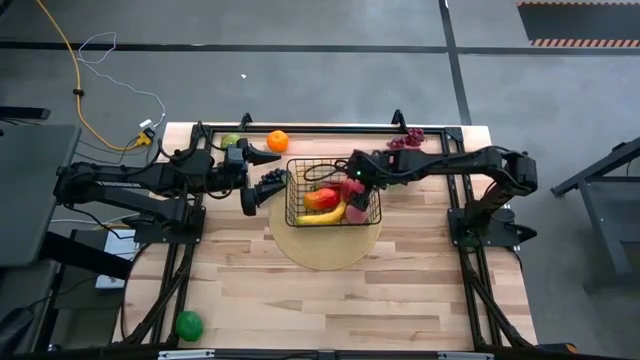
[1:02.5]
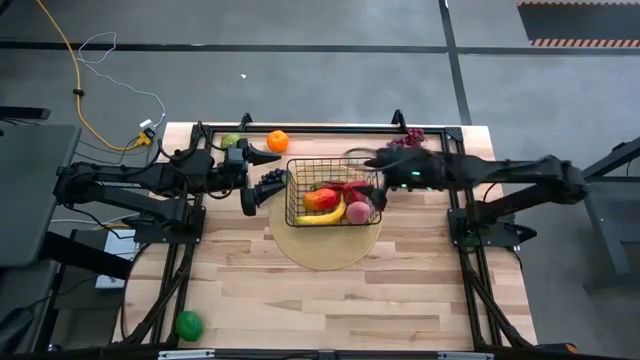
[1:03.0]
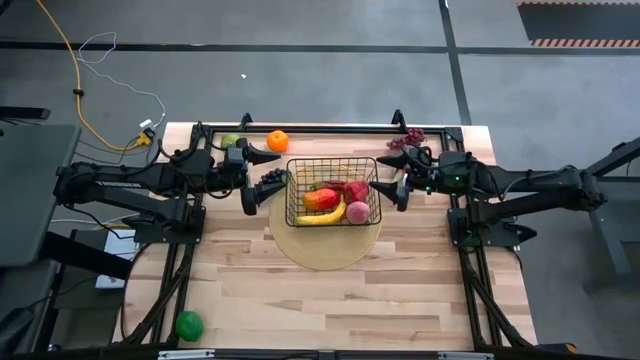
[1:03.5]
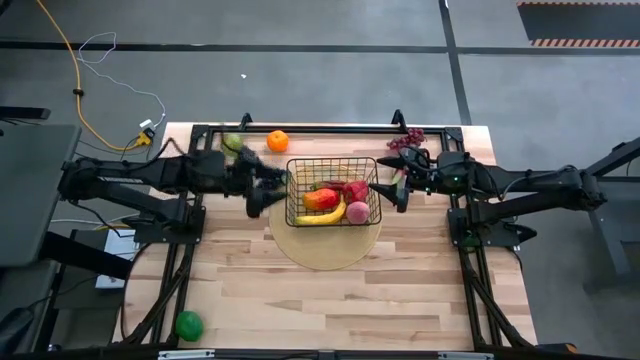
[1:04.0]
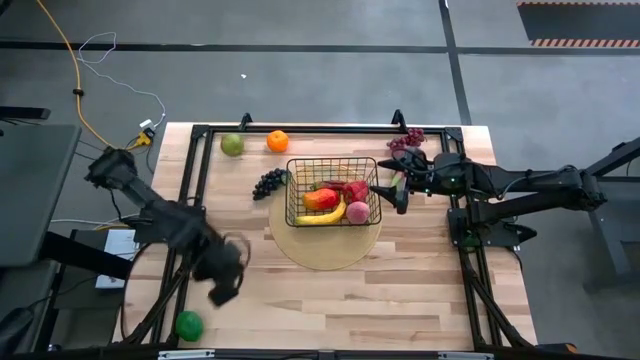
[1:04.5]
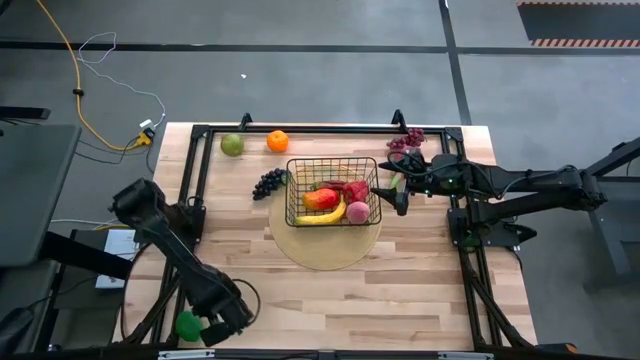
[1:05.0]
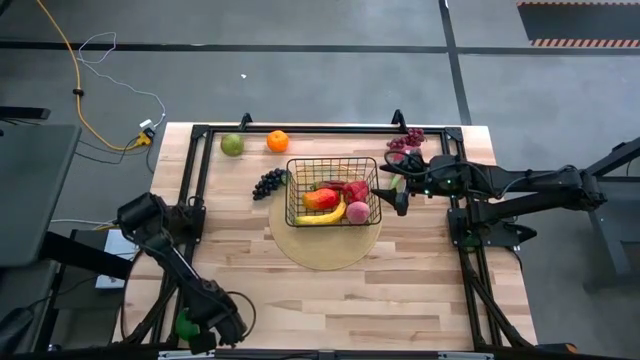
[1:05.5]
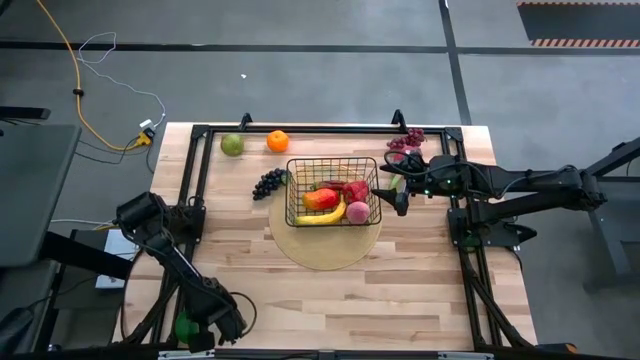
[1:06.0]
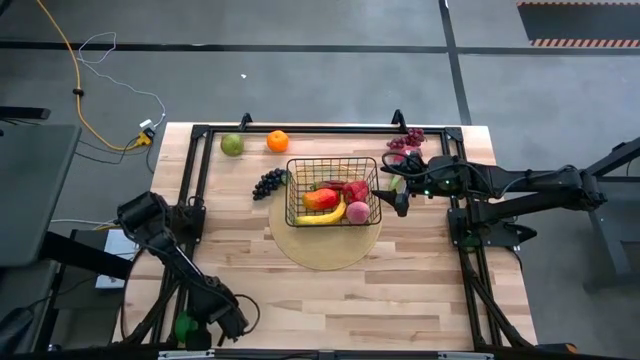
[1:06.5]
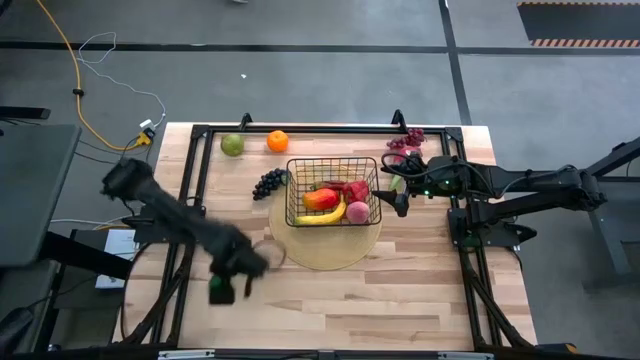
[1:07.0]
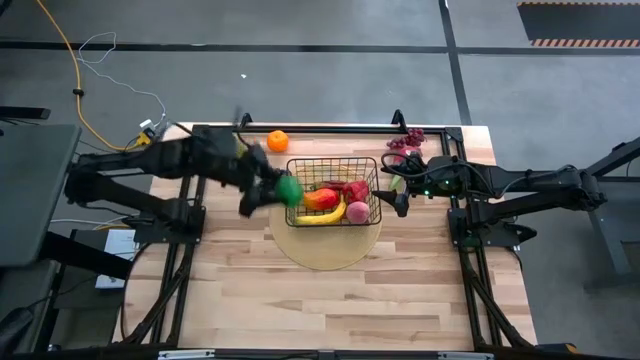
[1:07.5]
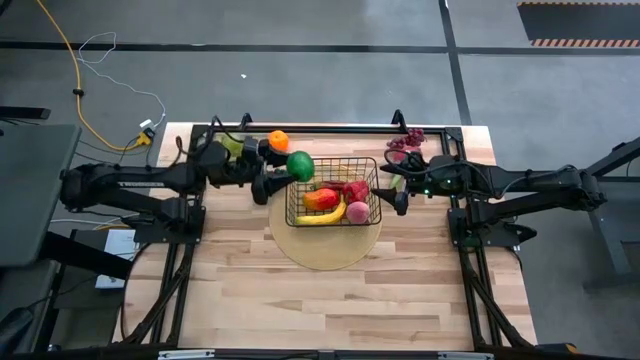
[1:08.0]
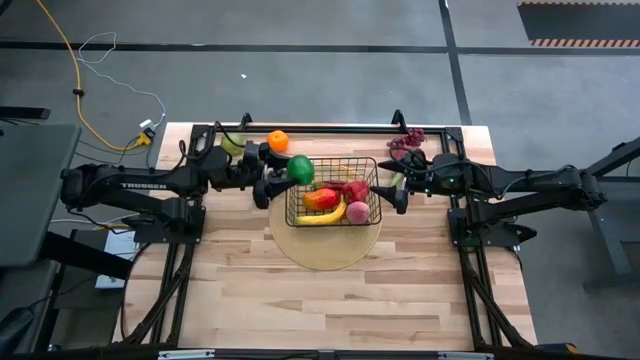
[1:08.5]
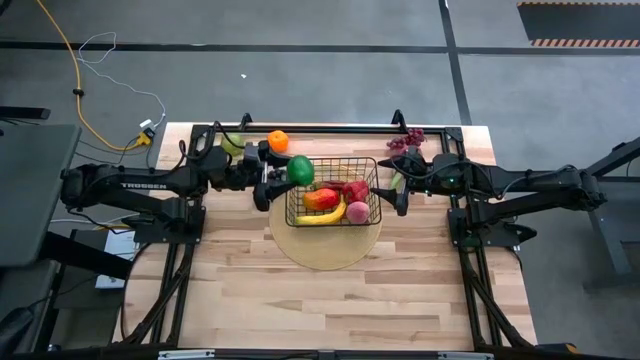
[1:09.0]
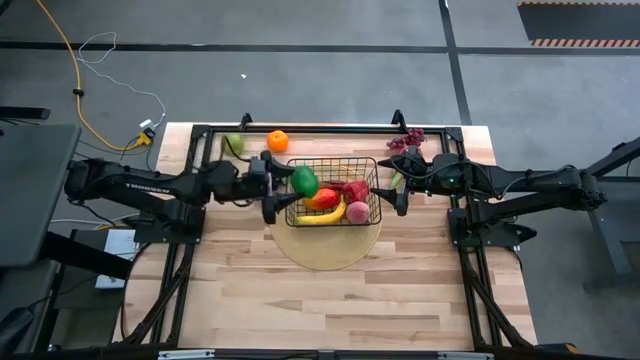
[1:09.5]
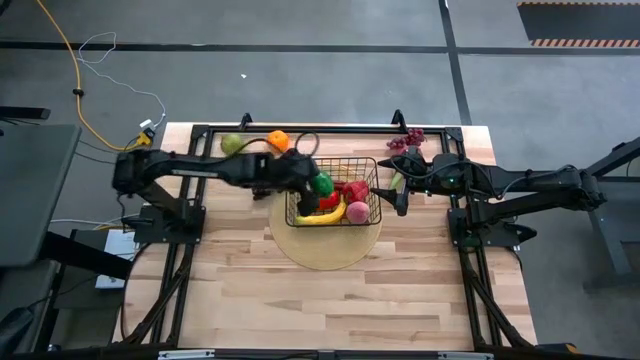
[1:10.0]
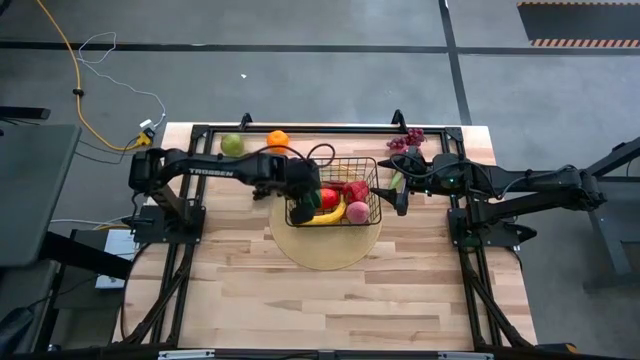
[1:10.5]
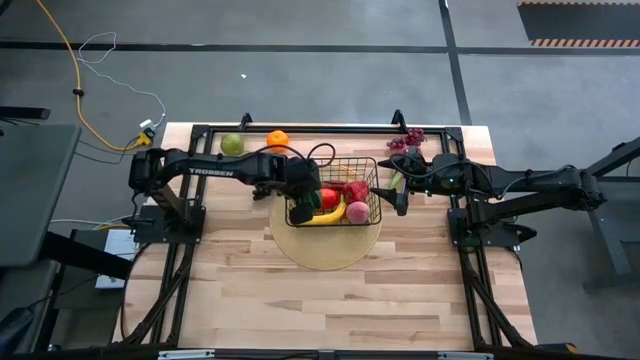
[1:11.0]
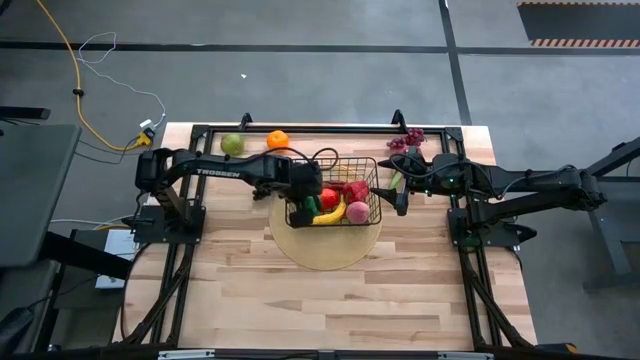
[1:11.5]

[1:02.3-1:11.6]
Task: Build produce basket
Put the green lemon into the wire basket

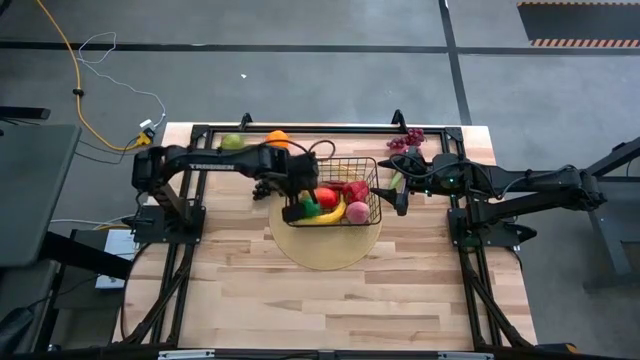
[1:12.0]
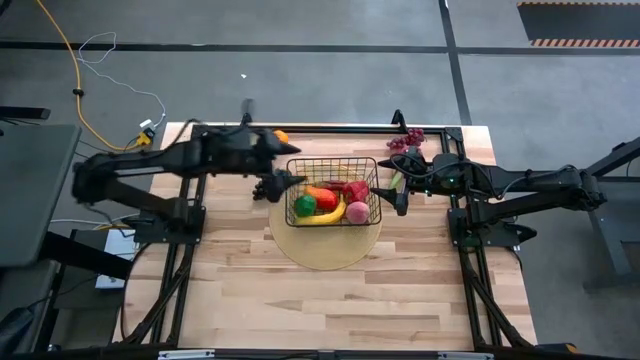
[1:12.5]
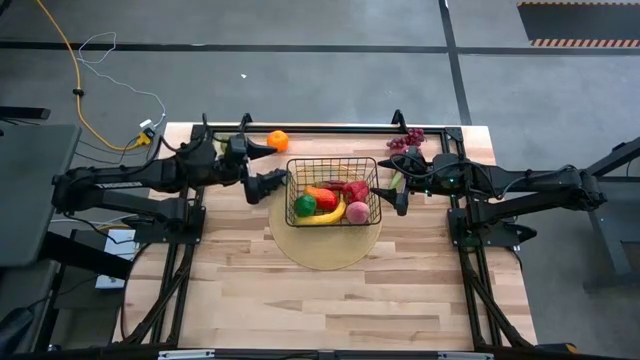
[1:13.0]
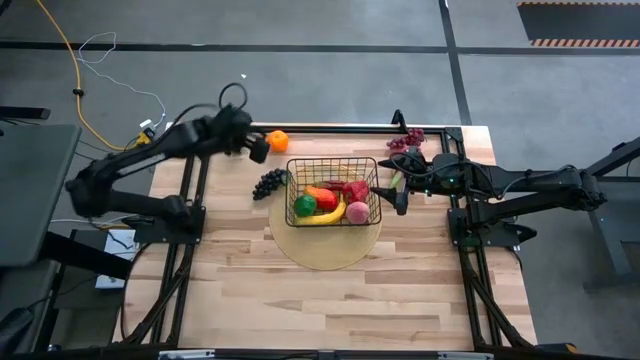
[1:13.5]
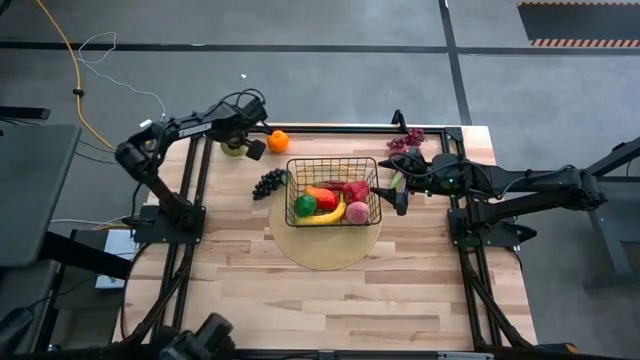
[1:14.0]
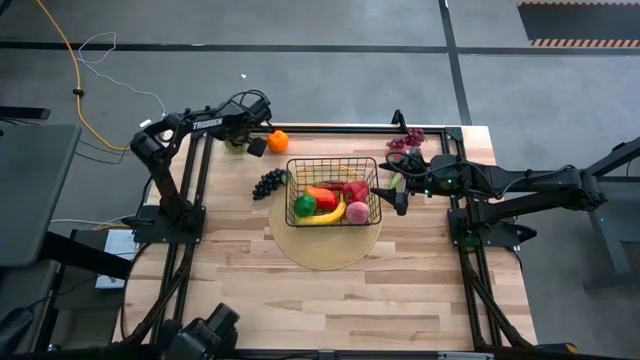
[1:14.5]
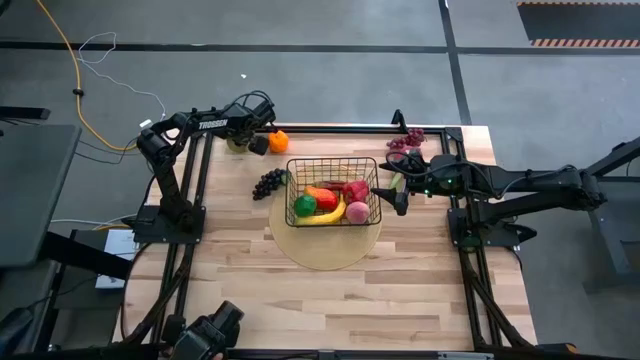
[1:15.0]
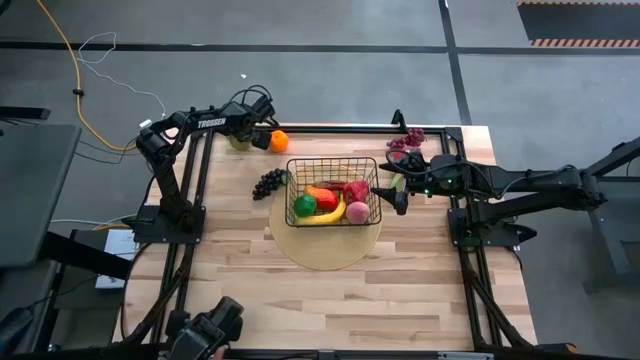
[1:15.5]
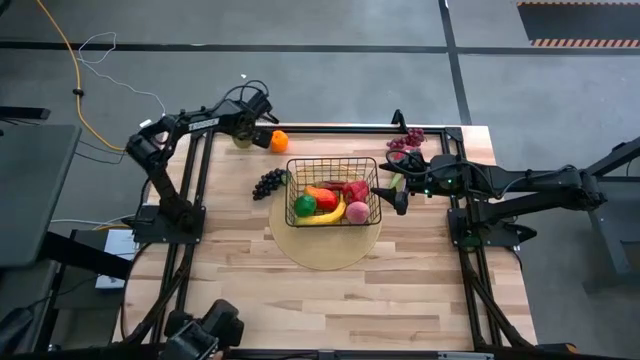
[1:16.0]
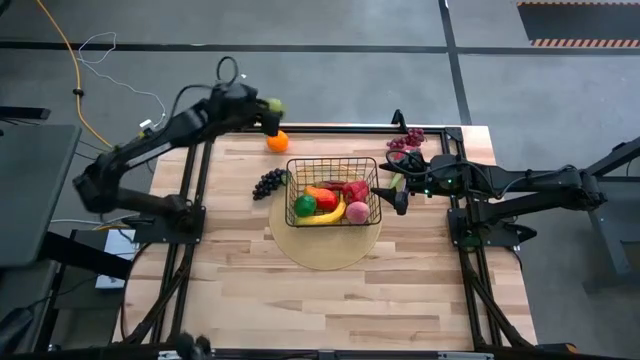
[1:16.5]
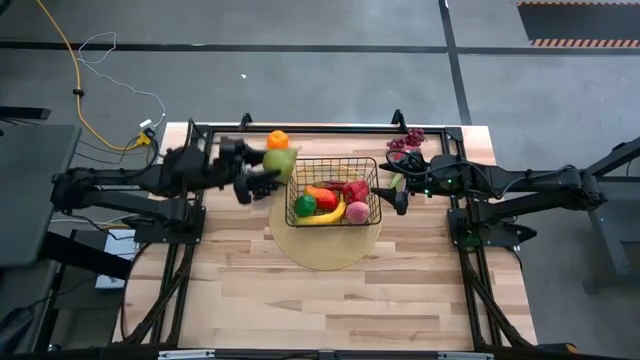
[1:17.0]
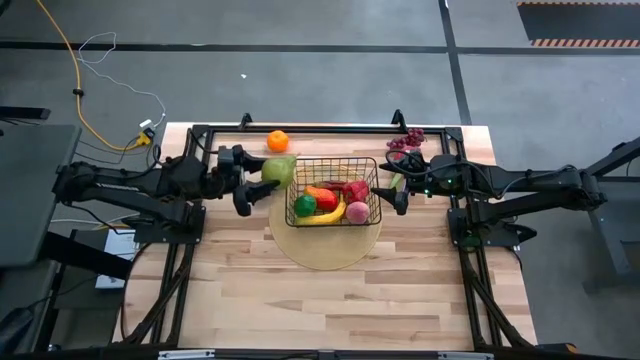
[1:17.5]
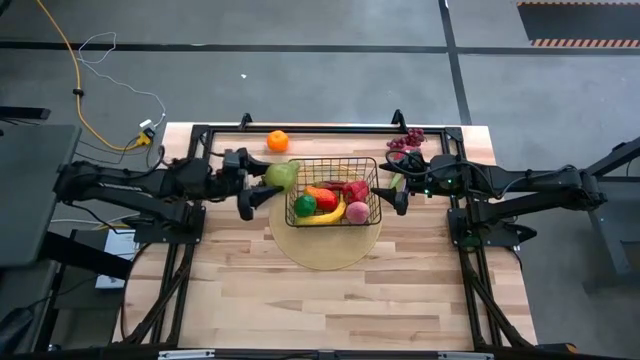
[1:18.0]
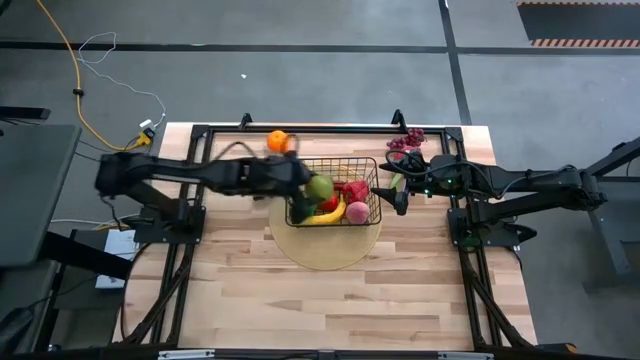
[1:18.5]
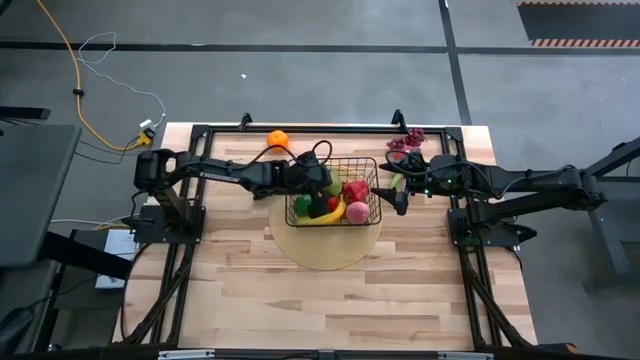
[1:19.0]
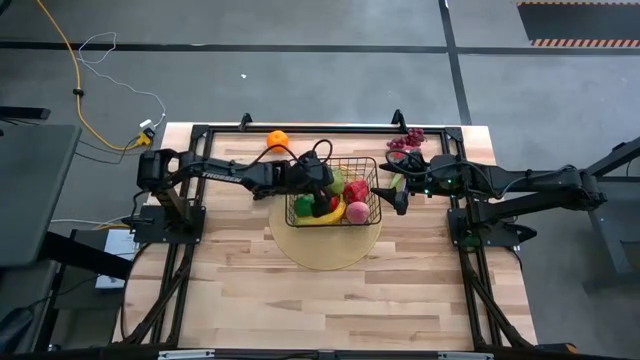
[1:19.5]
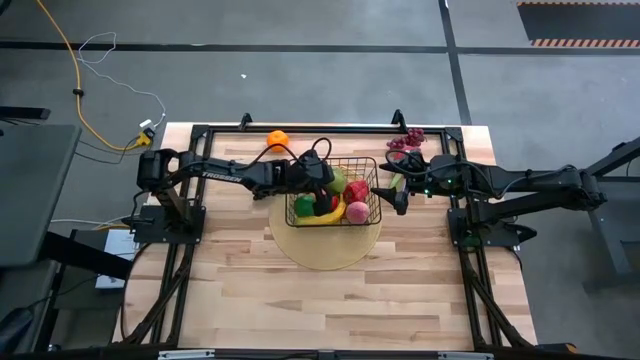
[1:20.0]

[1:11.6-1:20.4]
Put the pear into the wire basket

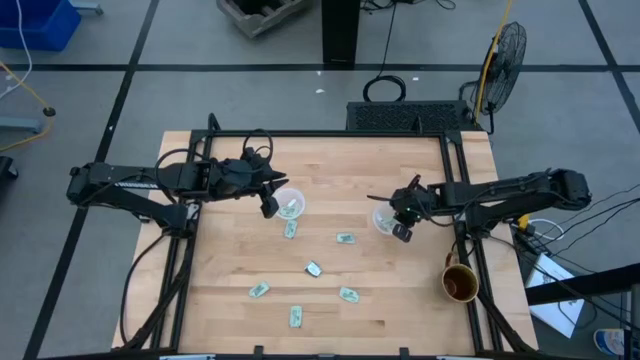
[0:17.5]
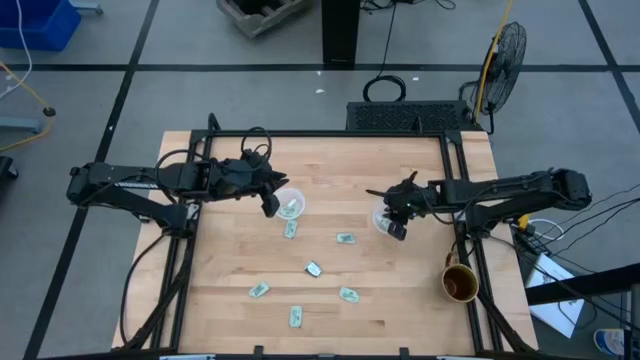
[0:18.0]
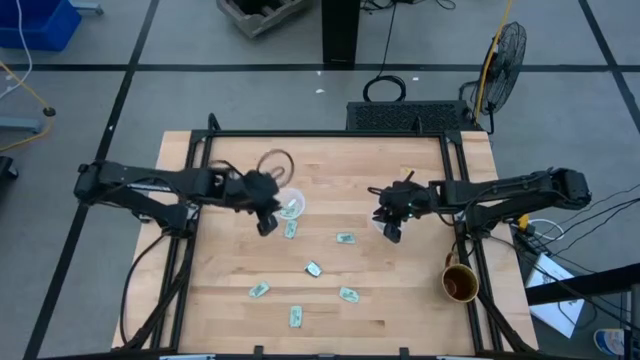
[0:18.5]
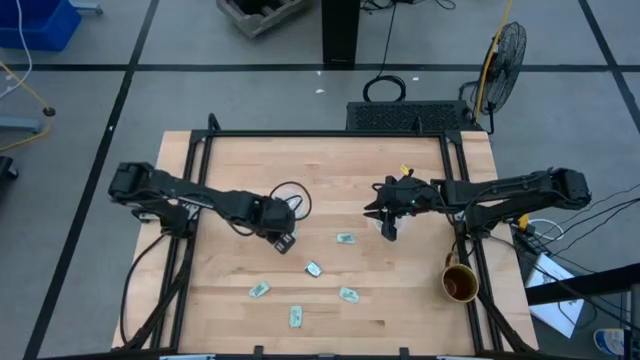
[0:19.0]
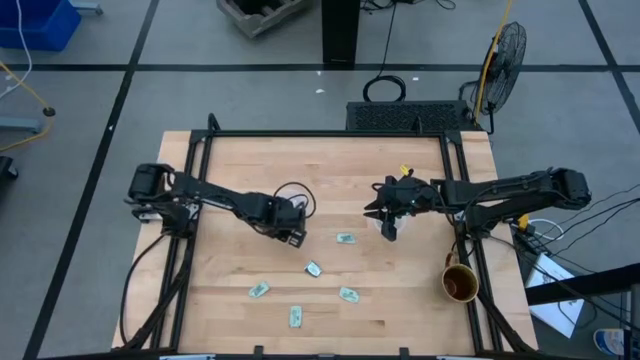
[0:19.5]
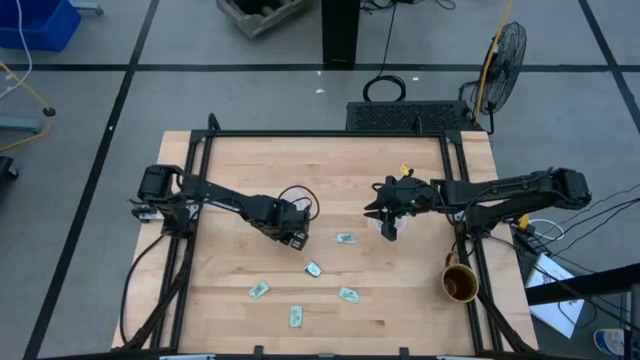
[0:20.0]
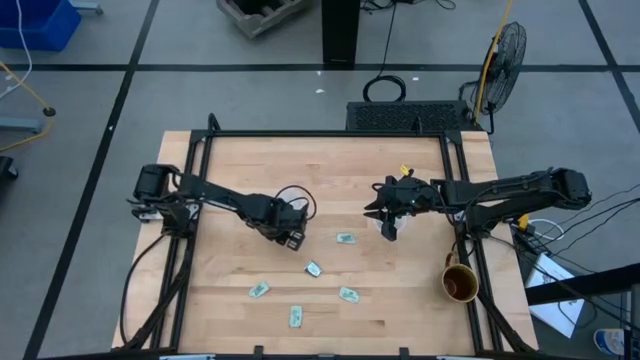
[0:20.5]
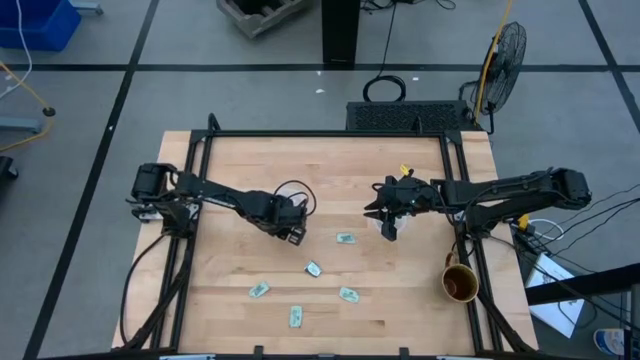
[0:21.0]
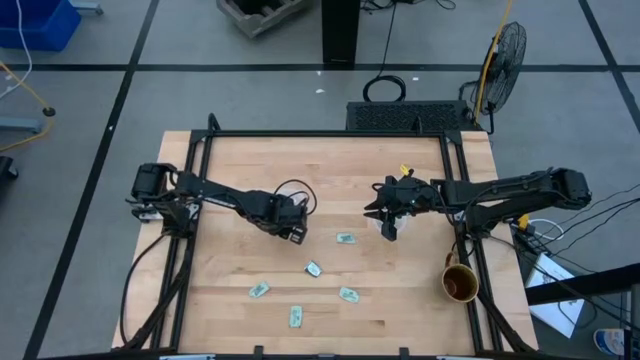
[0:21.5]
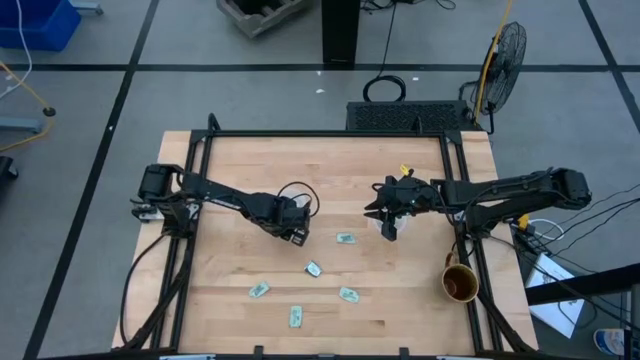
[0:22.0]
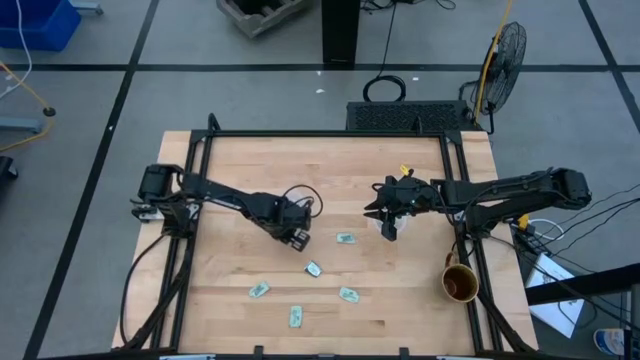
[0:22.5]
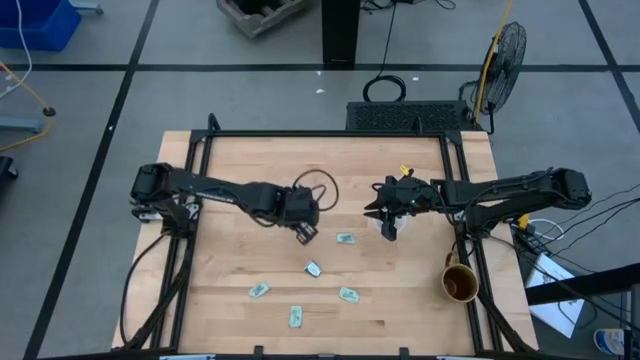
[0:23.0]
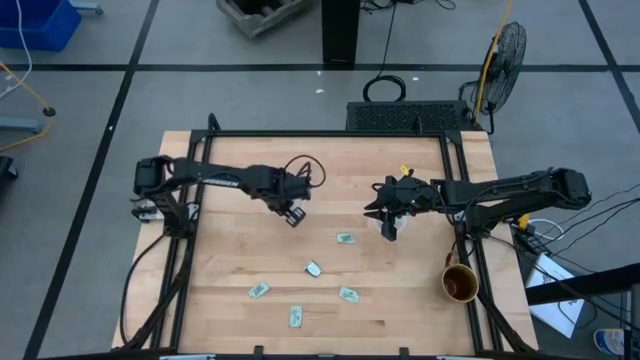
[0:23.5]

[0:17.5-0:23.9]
Task: Pick and place Stevia / Truvia into bins
Put the stevia packet into the left container
